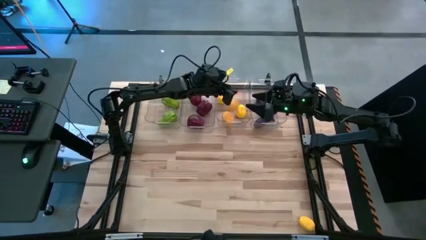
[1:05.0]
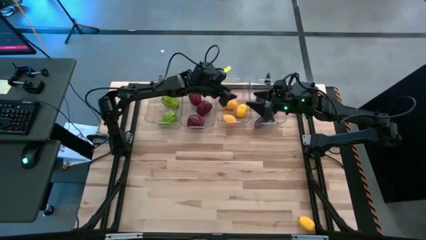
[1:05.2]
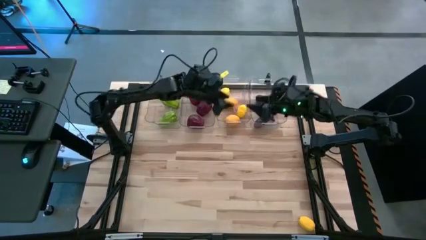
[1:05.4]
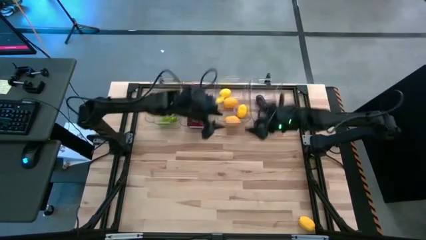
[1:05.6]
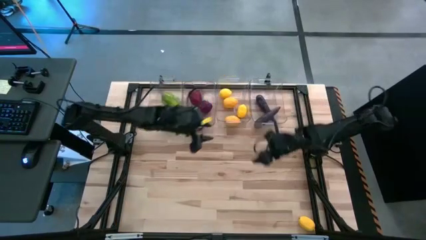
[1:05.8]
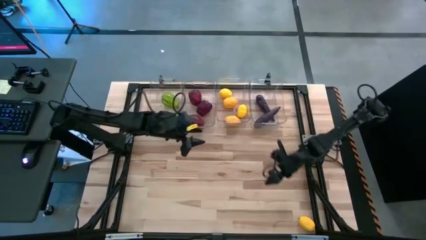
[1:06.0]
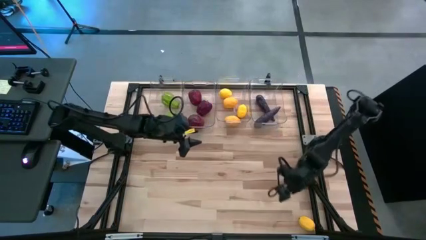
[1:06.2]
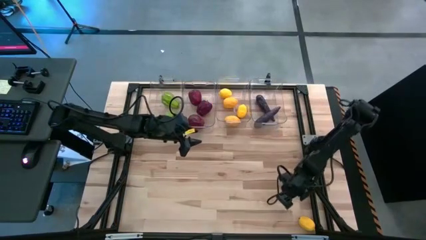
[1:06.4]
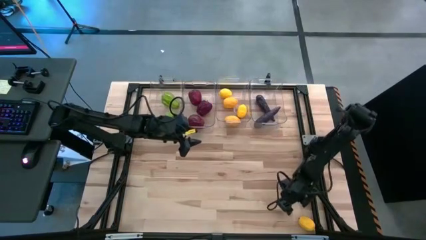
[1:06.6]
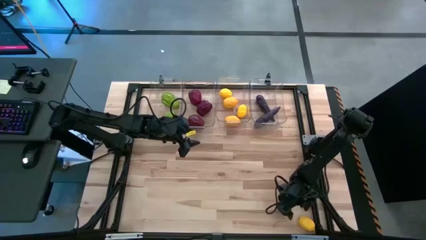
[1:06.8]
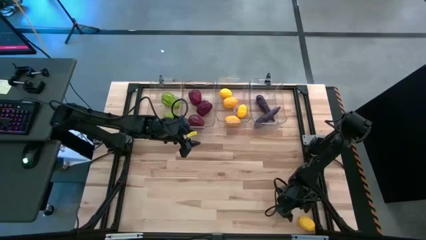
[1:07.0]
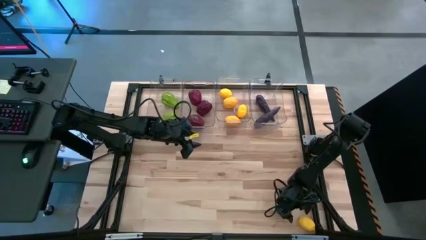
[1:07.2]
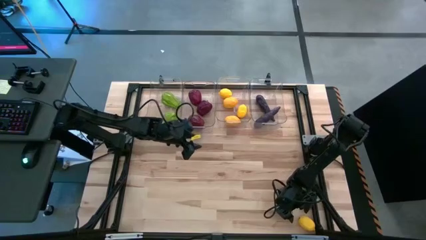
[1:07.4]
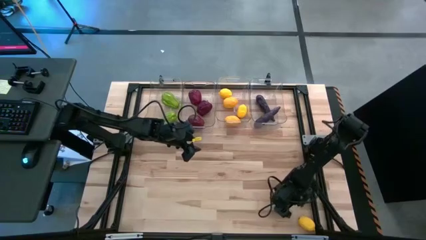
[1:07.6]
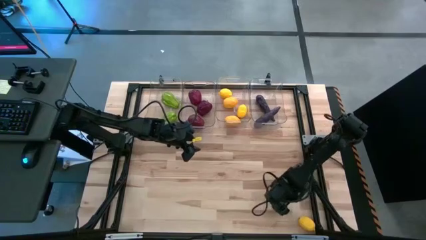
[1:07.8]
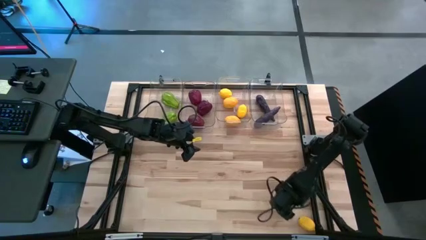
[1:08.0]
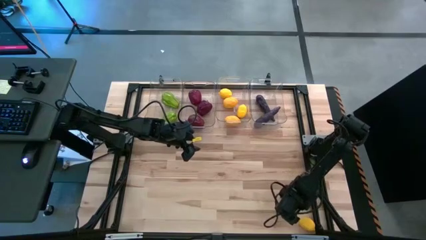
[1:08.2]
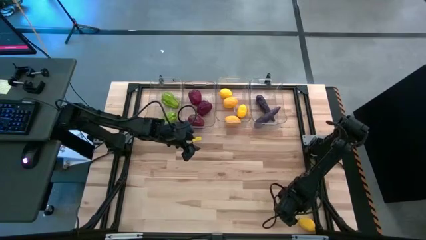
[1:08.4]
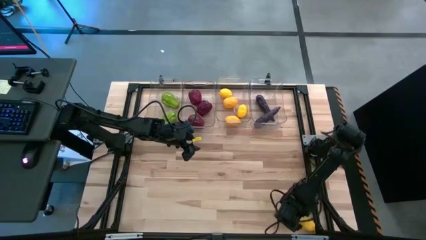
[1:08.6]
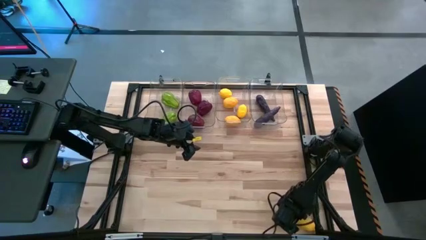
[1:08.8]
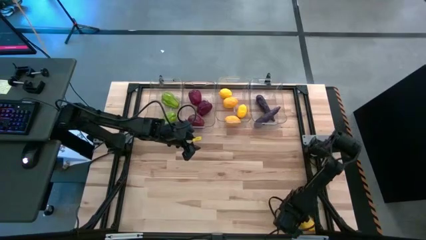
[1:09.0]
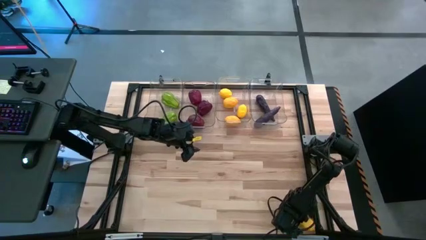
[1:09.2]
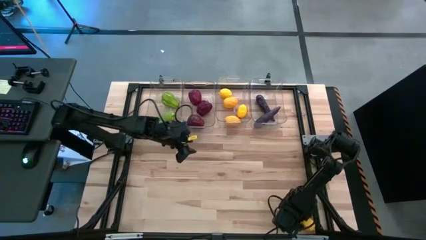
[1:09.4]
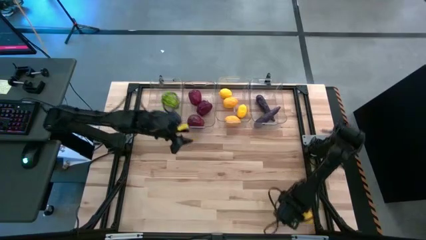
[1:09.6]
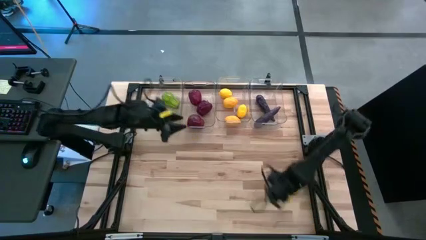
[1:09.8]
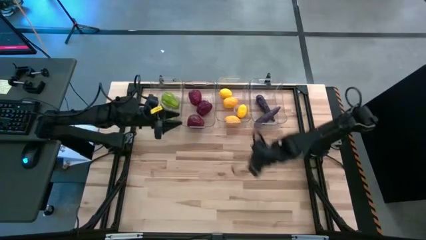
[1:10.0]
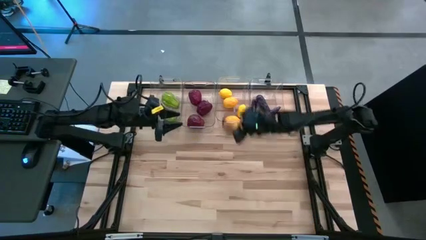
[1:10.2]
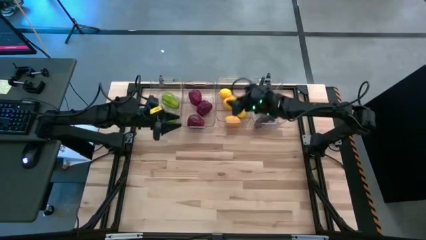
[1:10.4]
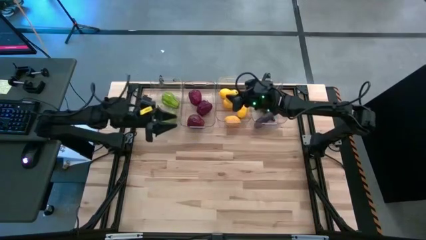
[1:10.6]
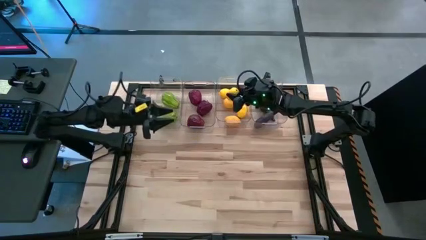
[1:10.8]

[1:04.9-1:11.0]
Task: Sort produce into baskets
Put the yellow lemon into the middle right transparent bin

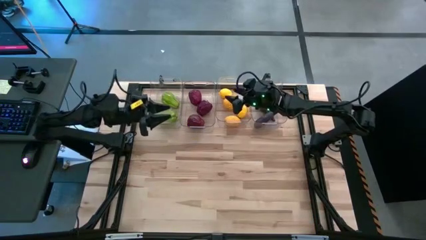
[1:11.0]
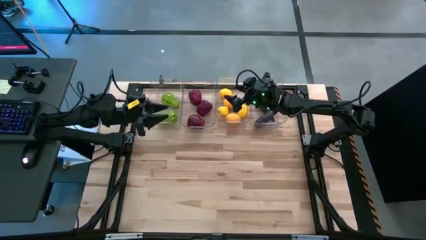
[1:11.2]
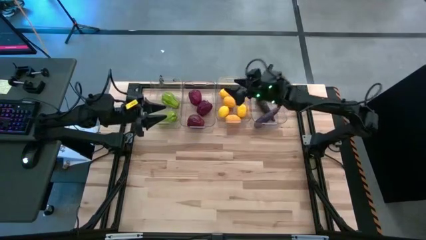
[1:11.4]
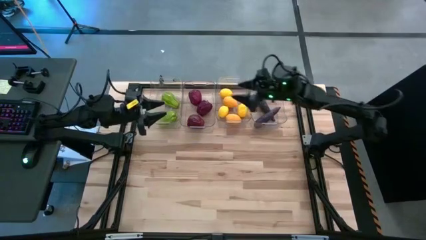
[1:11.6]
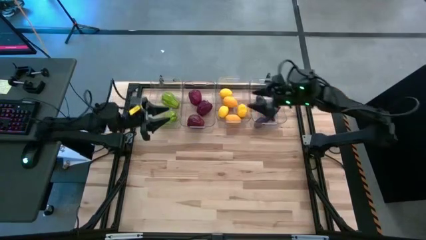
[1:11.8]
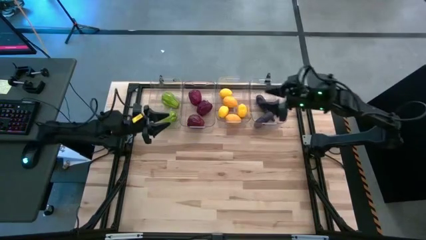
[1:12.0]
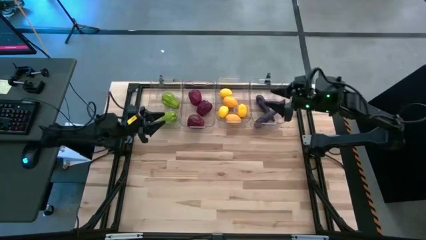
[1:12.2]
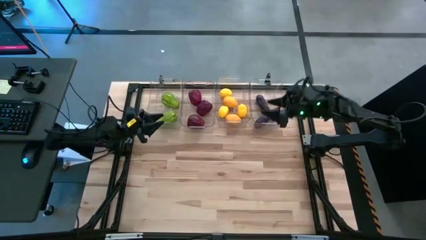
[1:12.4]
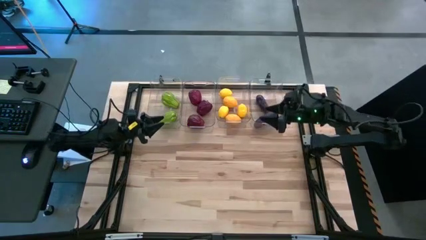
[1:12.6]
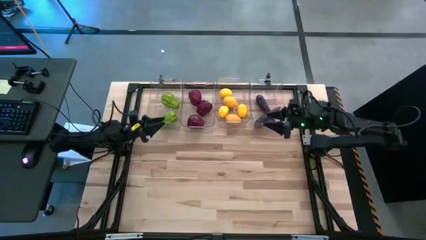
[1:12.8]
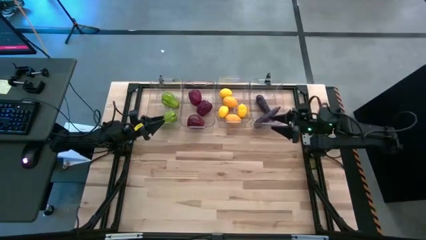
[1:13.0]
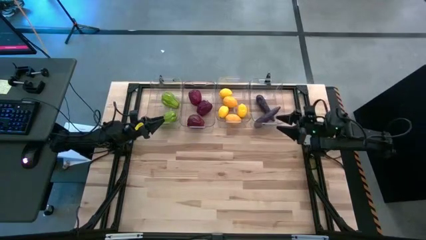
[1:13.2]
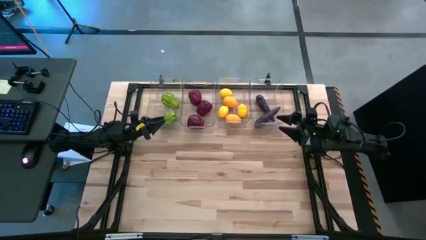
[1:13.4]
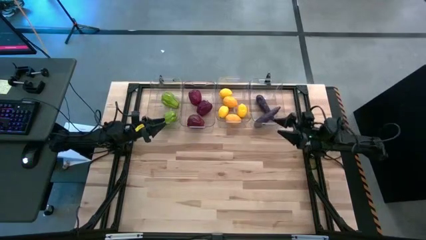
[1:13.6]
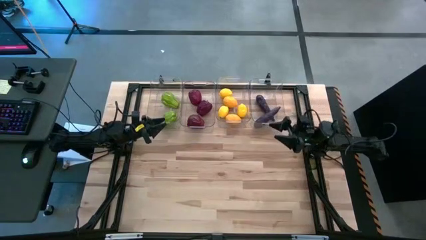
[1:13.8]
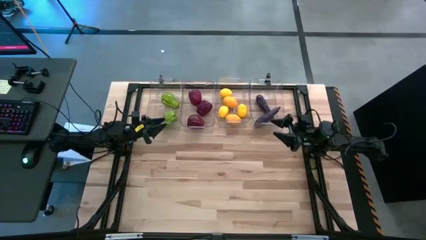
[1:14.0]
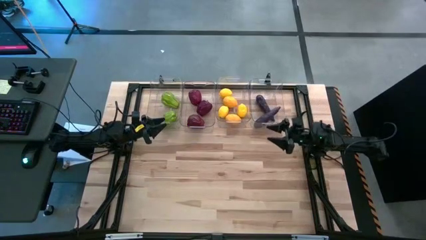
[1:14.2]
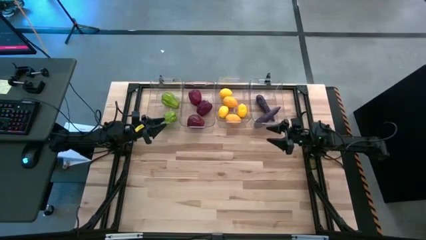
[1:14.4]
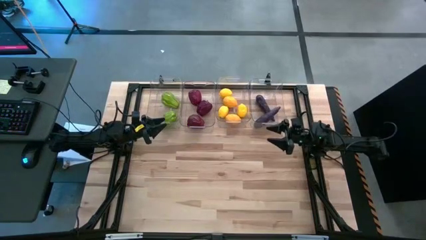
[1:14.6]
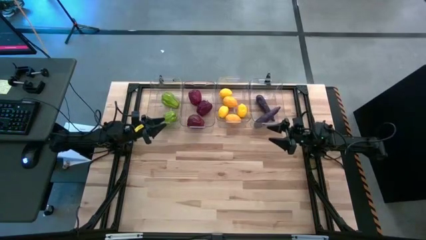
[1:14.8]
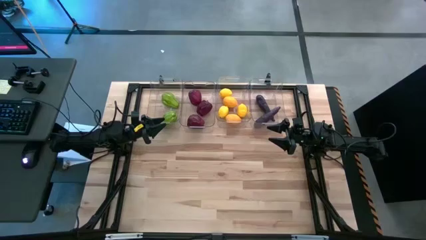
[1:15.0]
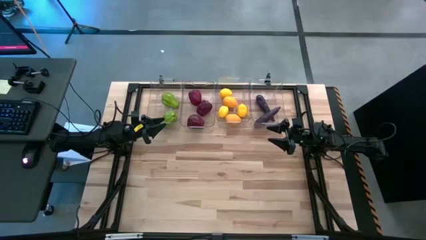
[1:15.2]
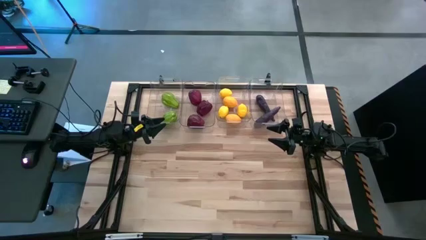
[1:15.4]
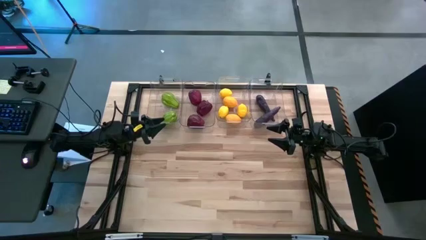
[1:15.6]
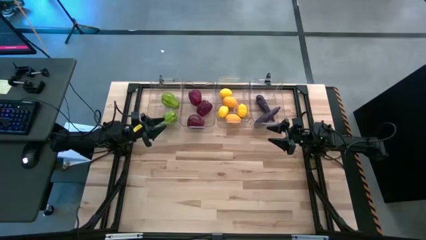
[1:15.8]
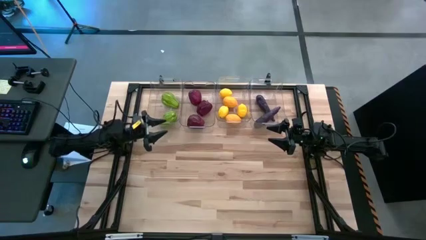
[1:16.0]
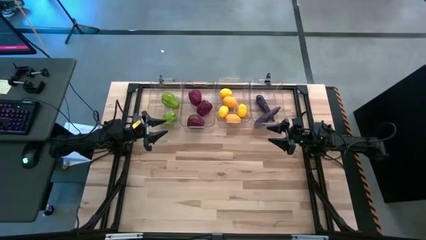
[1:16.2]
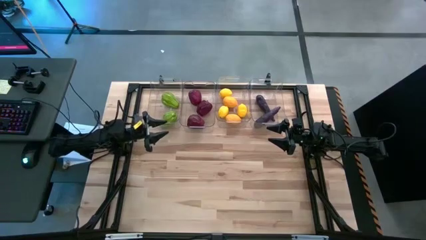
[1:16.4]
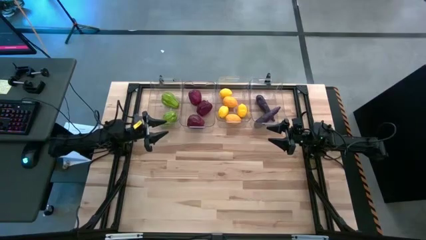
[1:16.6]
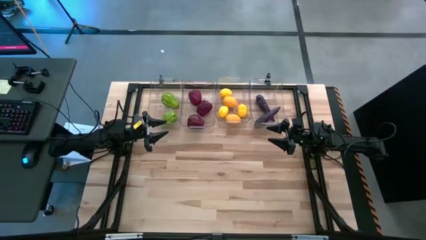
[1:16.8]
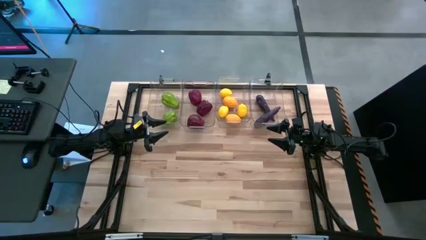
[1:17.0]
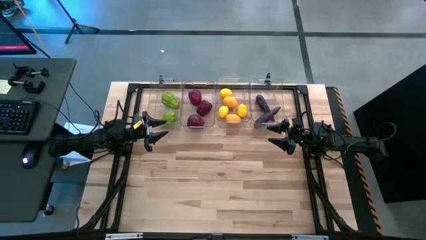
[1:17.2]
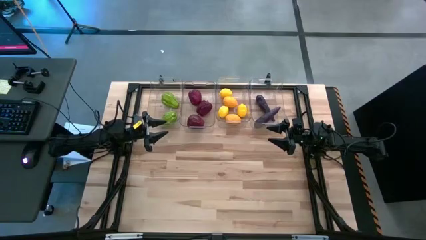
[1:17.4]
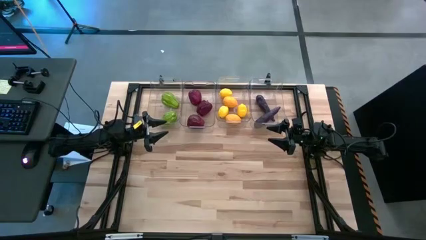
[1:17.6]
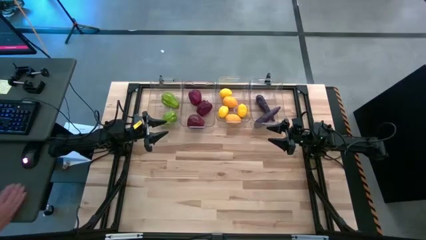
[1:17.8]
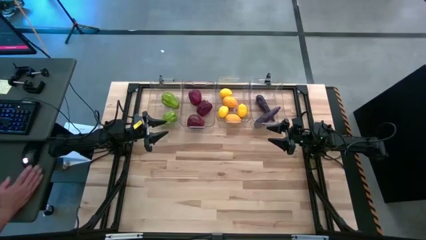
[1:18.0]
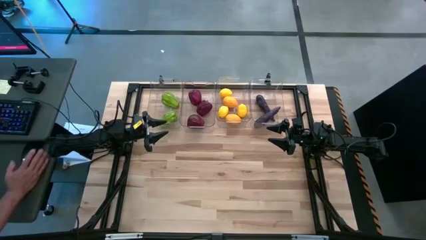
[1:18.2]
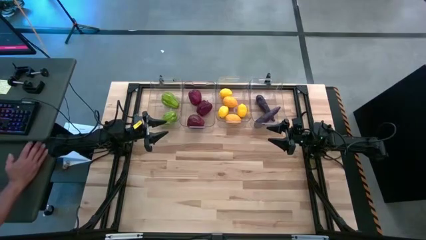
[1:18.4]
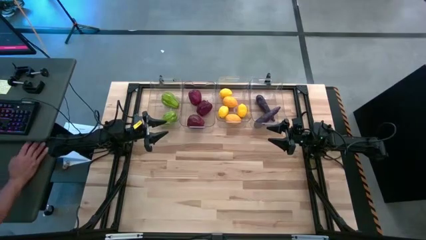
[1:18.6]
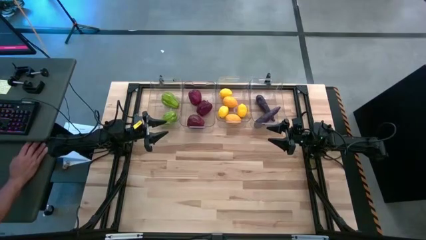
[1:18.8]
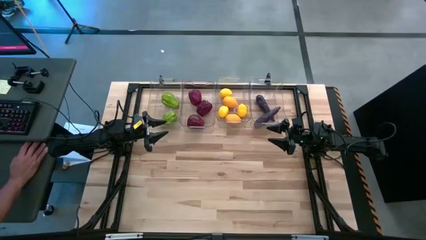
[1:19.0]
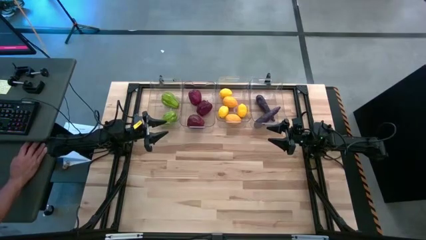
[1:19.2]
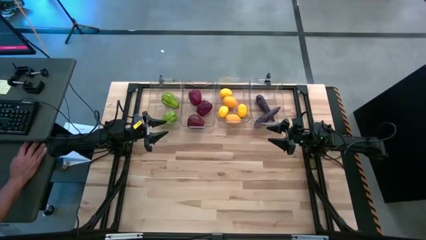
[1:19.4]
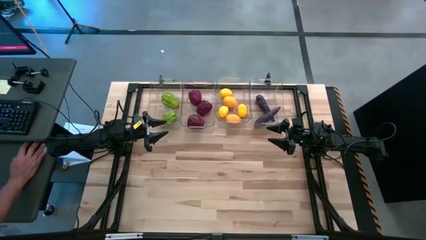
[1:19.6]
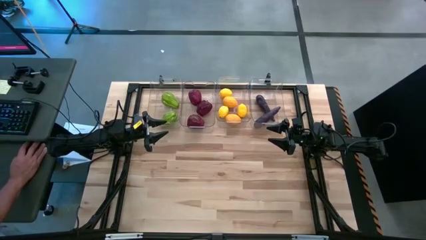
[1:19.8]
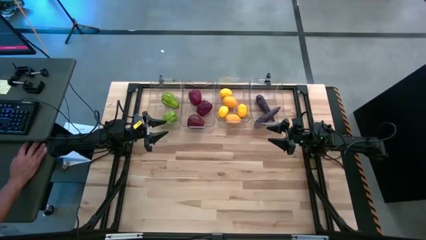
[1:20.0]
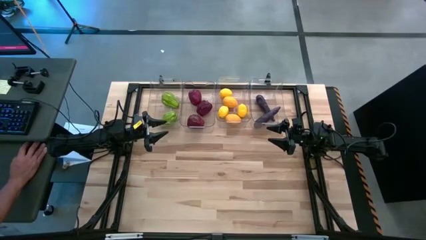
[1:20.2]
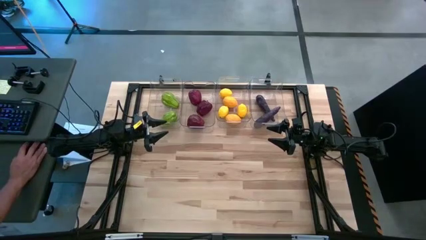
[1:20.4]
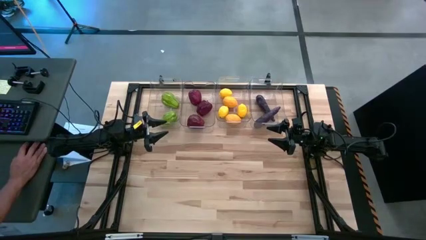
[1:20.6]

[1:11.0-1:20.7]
Return to Home Position
